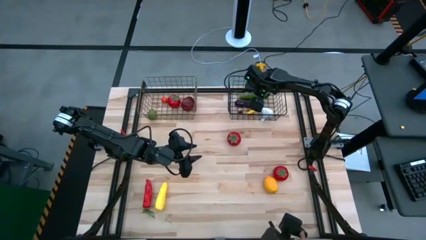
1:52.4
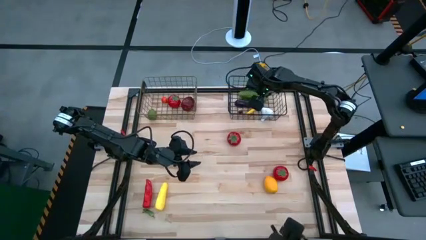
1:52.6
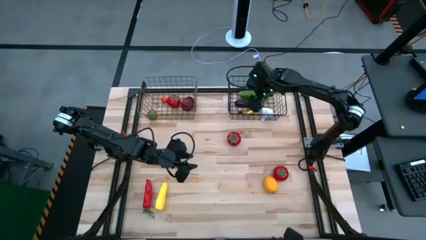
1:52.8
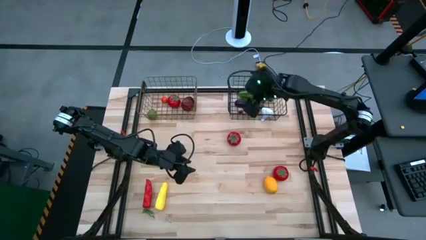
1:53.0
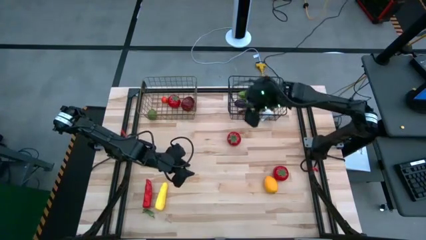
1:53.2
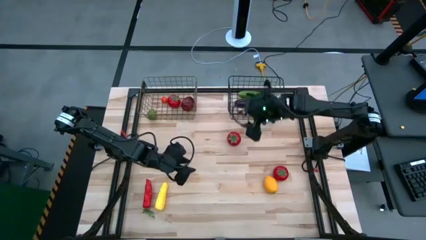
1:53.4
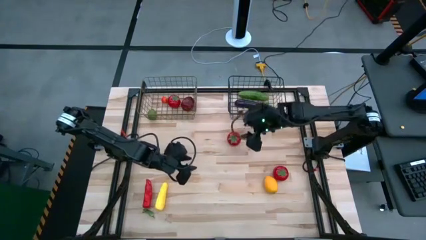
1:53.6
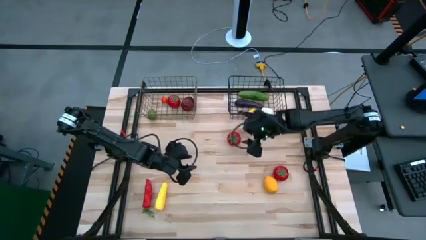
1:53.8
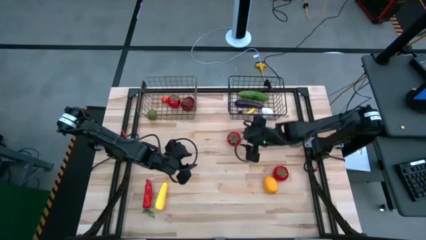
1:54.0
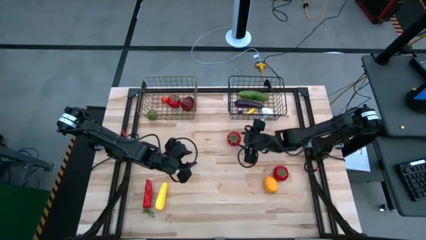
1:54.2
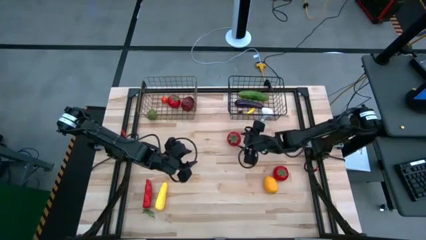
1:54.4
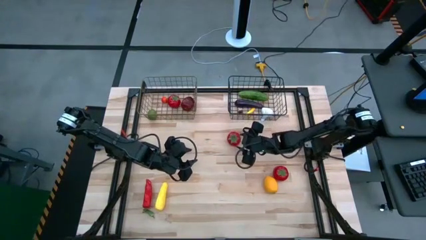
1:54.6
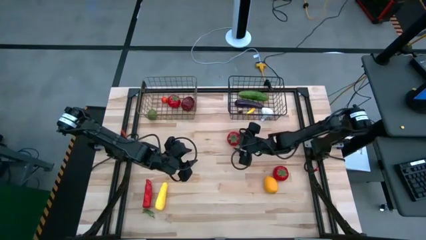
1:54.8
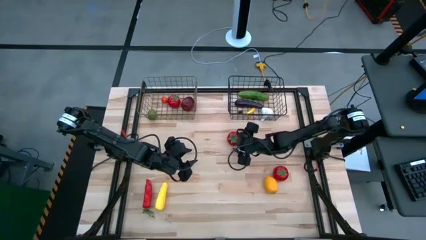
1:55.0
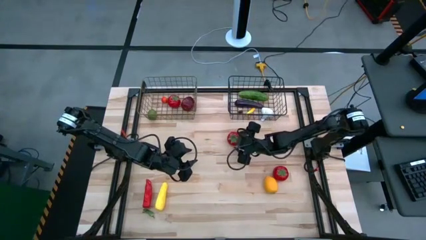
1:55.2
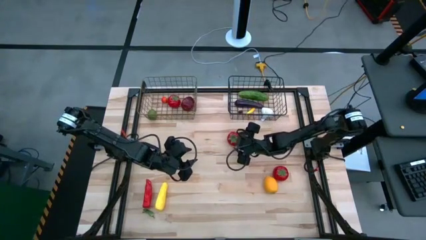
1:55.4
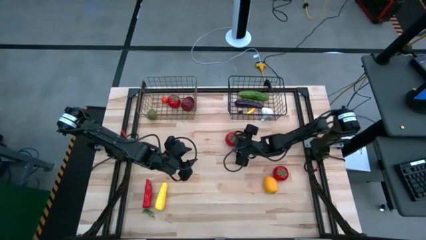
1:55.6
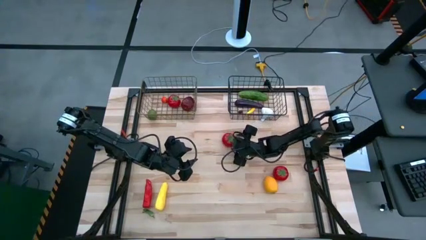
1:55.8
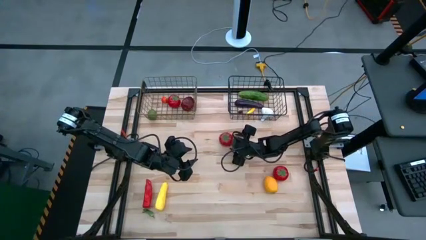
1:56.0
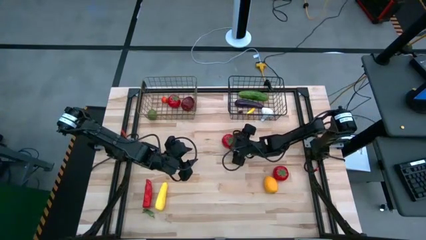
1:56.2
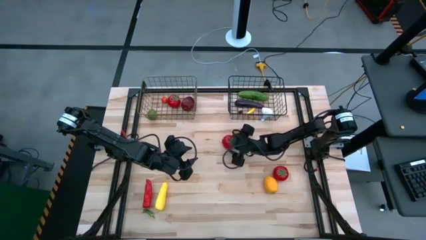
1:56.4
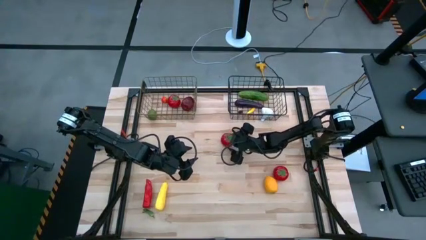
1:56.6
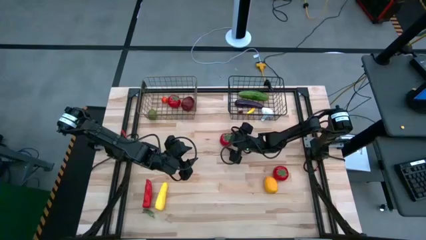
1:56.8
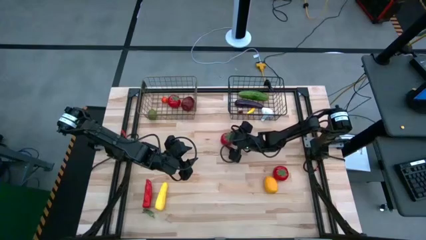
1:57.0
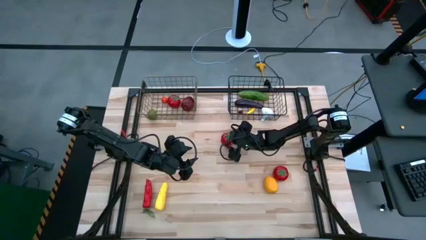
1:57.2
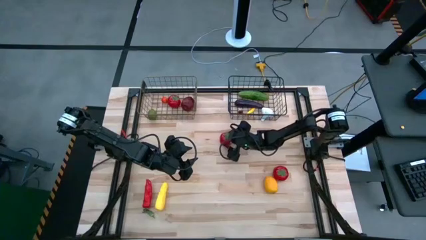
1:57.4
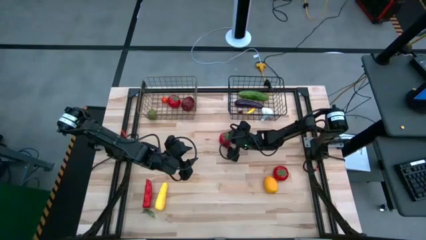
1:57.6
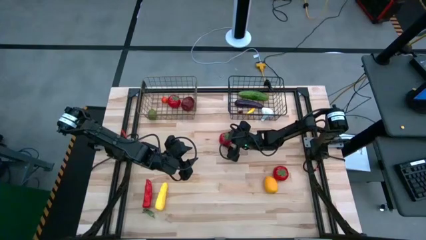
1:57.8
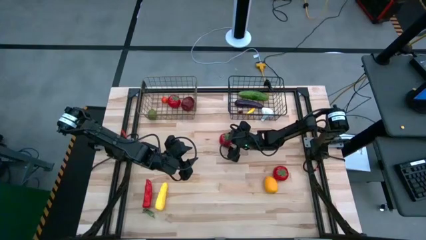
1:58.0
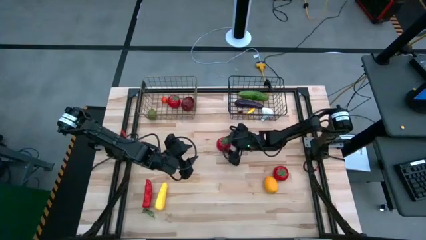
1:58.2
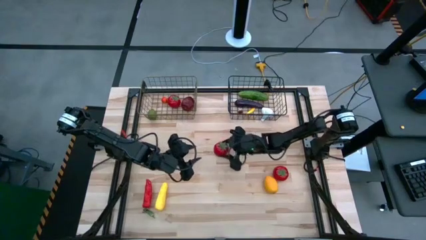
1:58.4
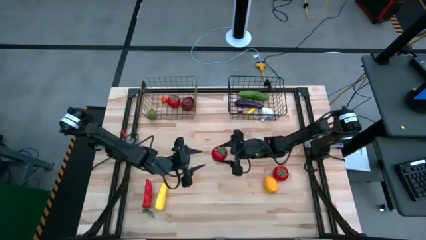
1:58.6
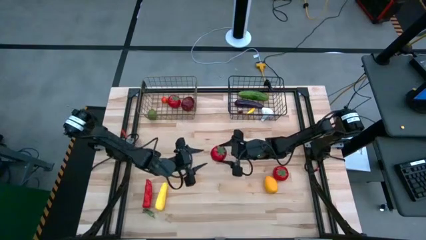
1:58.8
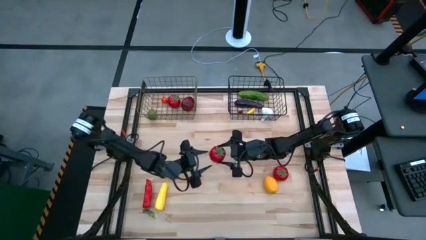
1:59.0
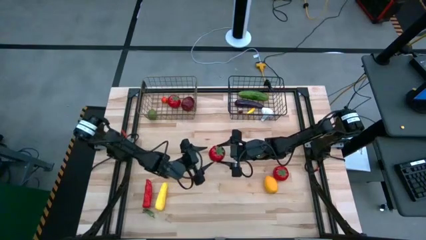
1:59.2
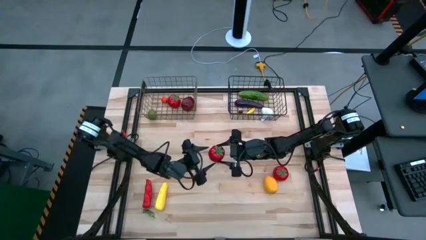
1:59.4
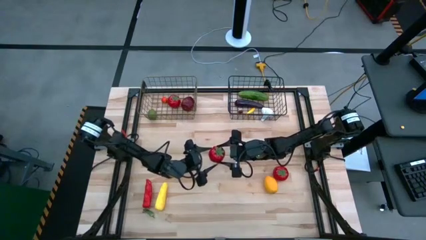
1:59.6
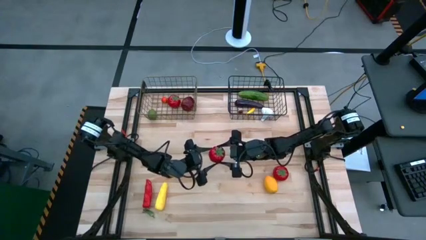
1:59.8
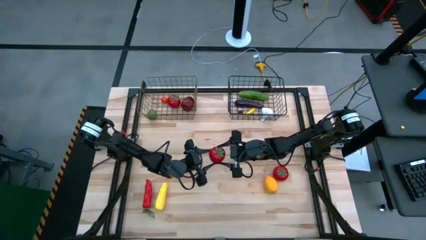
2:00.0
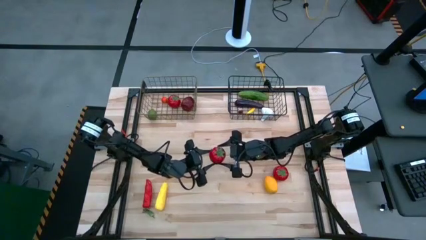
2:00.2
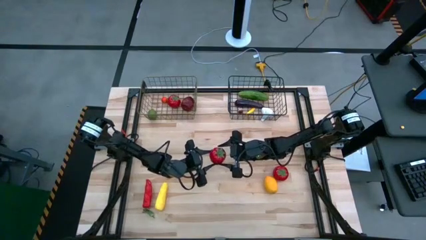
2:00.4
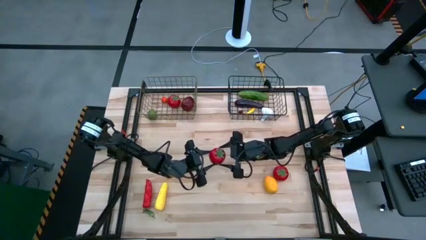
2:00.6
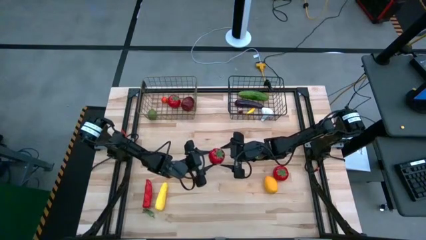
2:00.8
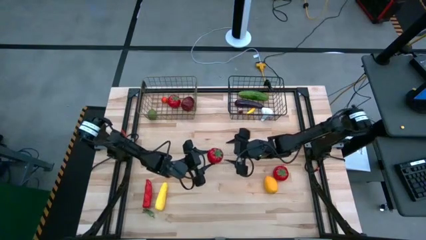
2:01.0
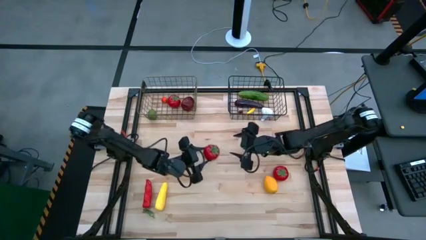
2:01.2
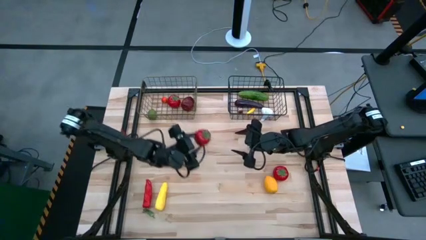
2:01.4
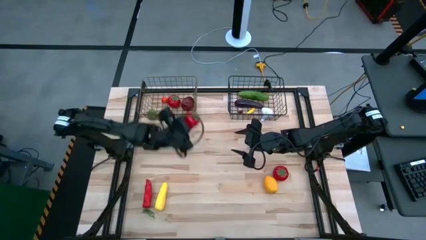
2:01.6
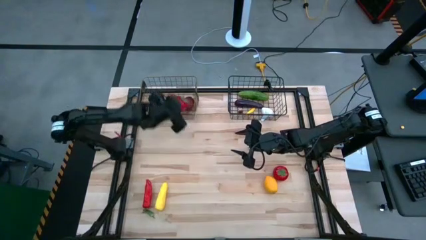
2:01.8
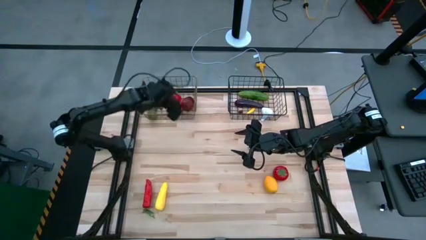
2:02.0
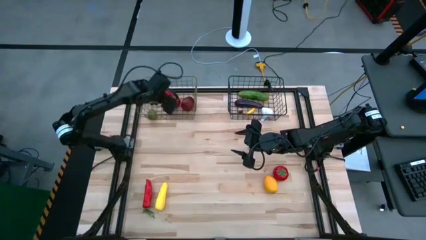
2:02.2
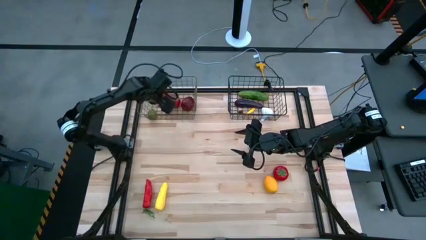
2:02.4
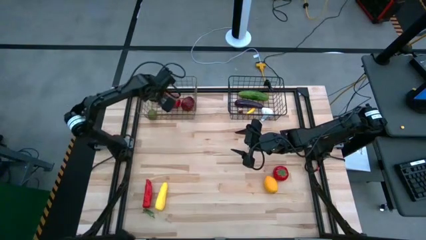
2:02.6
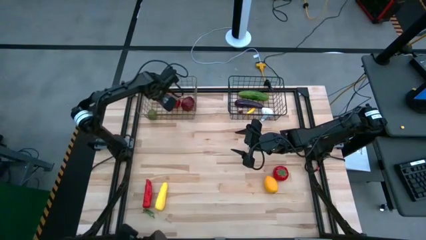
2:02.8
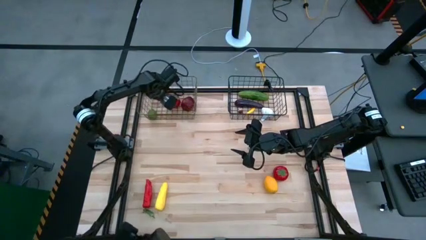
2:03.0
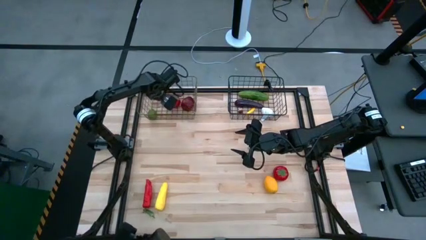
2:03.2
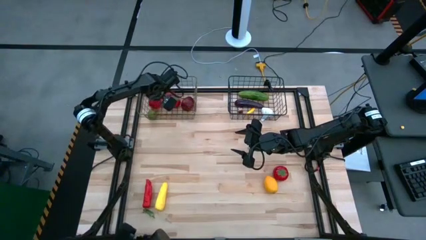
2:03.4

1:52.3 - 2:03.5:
Task: Sort produce into baskets
Put the left tomato into the left wire basket

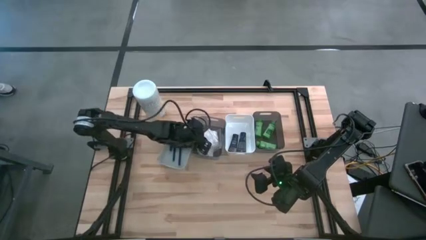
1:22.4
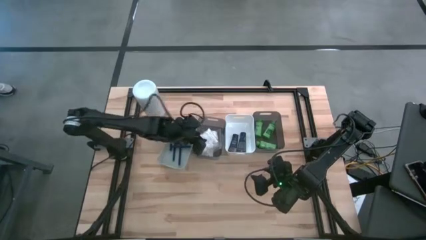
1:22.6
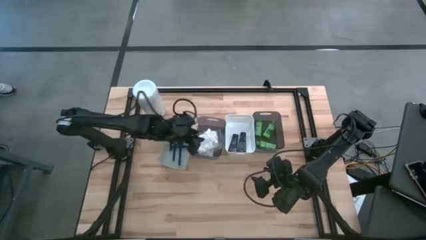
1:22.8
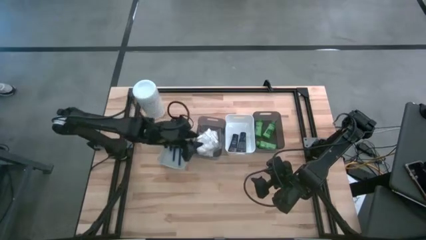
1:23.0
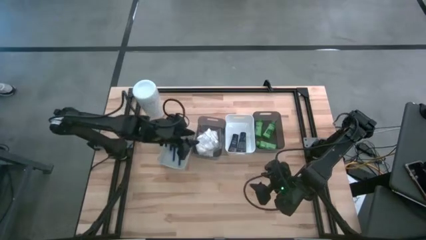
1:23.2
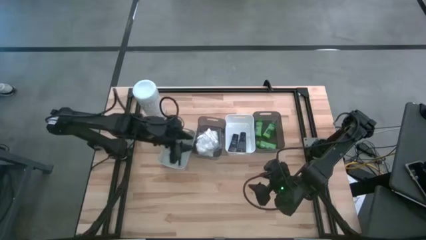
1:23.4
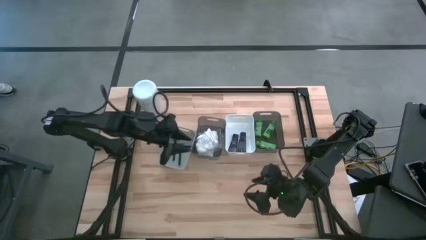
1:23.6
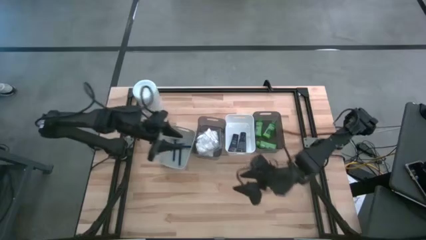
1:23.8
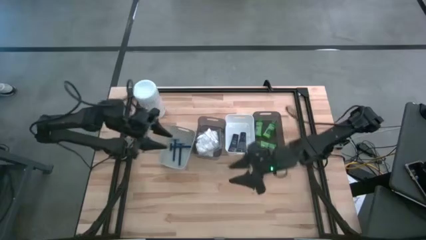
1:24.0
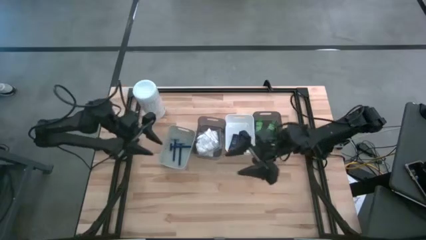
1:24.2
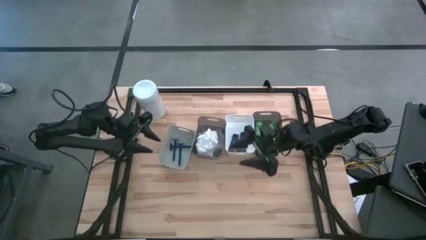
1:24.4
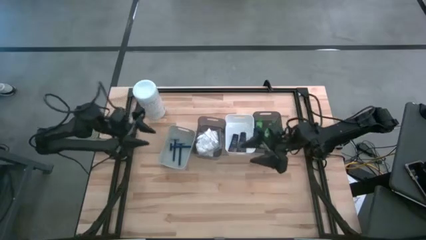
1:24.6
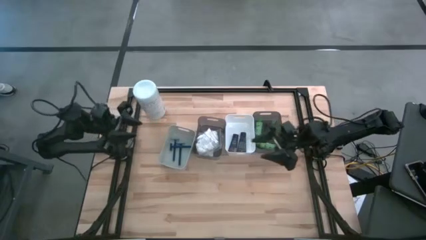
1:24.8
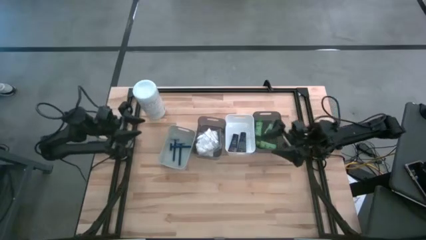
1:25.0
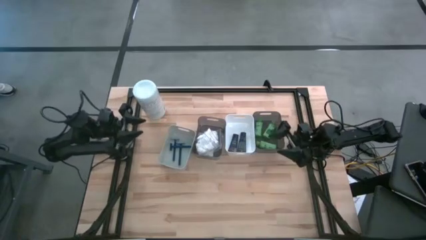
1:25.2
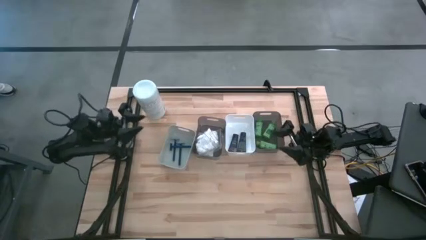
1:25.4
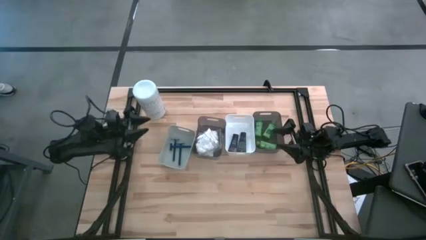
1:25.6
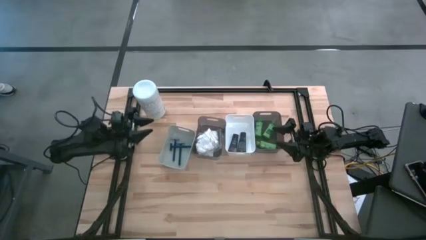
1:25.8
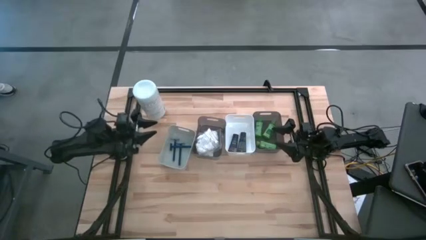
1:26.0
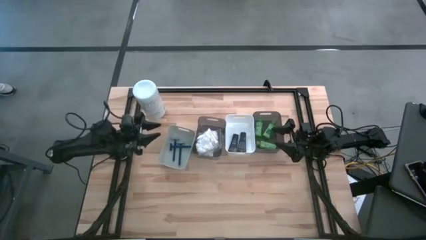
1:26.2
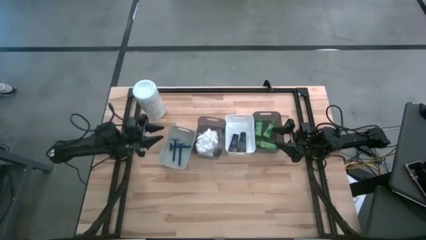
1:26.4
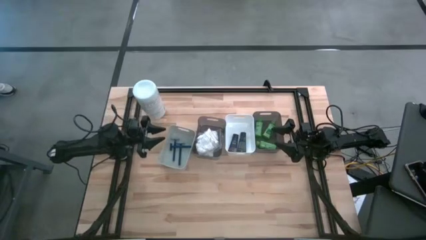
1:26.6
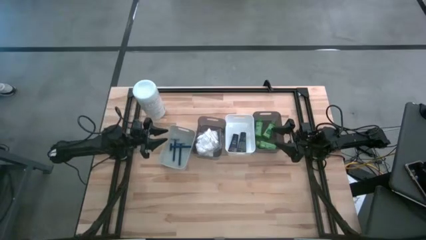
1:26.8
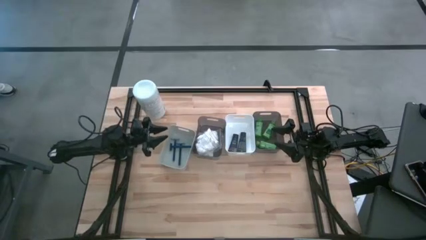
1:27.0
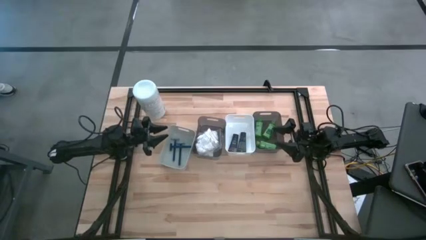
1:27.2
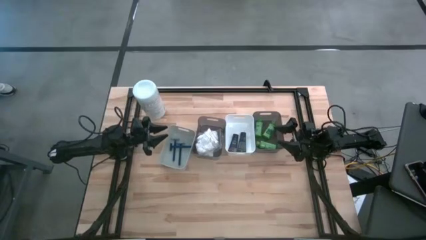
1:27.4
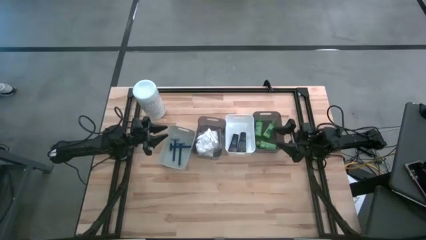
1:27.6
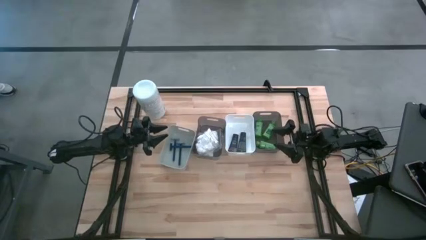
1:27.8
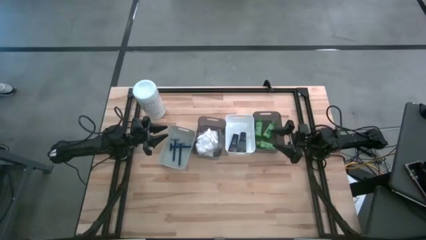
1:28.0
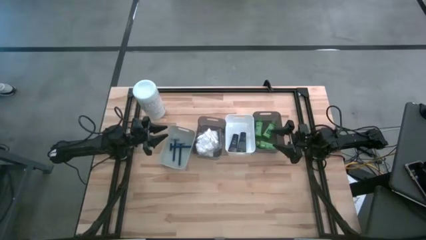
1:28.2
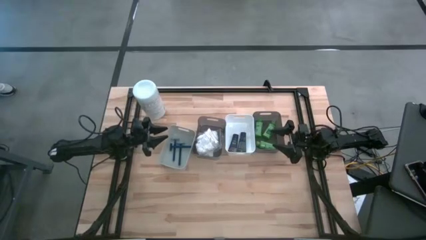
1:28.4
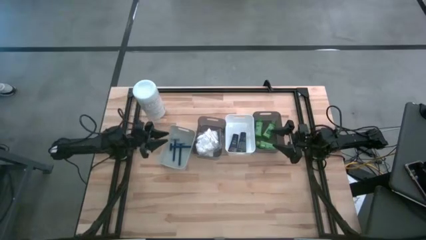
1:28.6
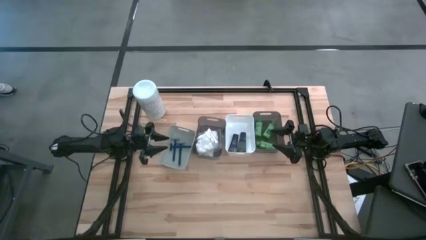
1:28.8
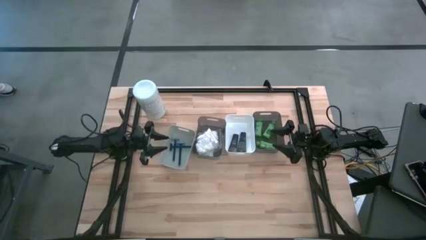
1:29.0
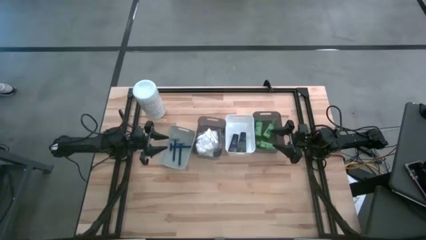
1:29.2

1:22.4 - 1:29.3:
Task: Pick & Place Travel size toiletries
Return to Home Position
